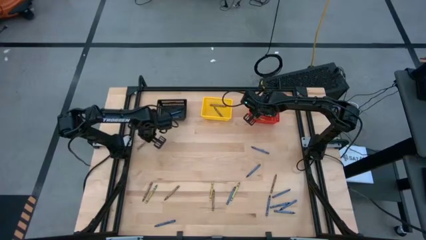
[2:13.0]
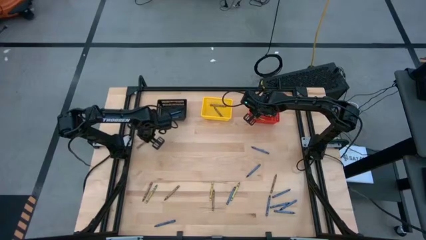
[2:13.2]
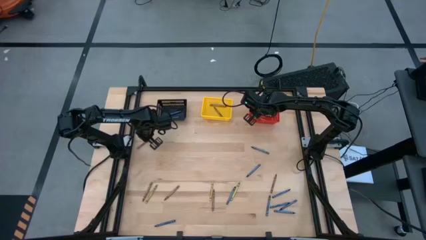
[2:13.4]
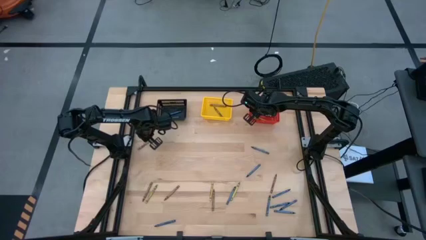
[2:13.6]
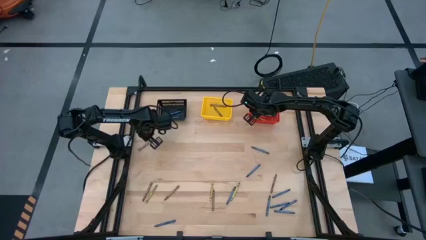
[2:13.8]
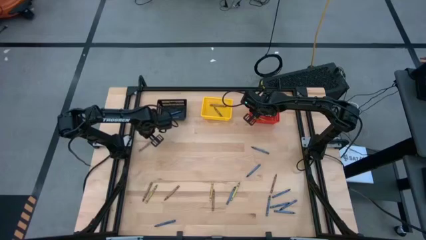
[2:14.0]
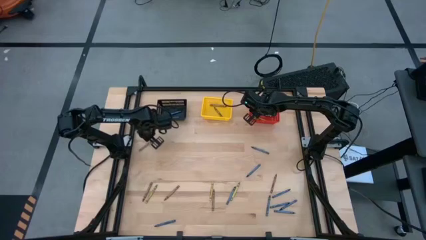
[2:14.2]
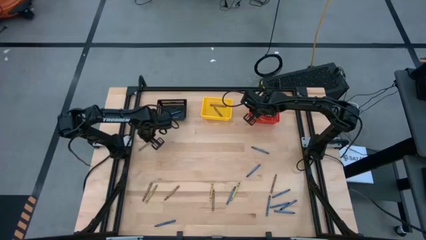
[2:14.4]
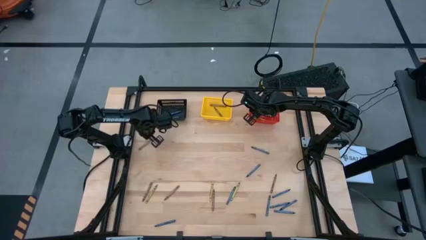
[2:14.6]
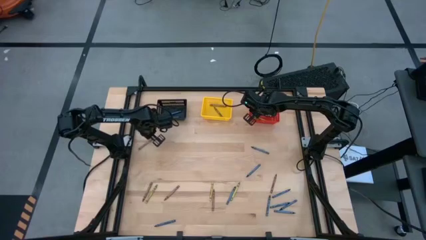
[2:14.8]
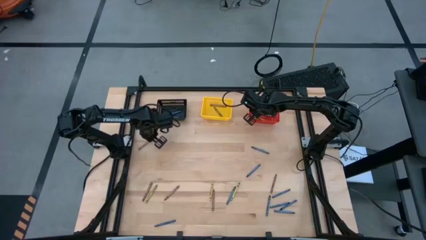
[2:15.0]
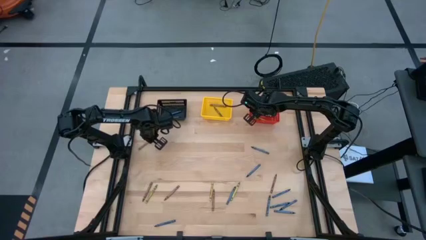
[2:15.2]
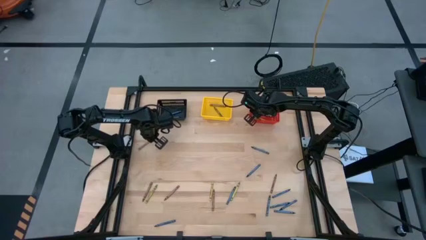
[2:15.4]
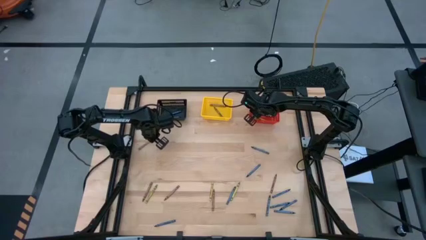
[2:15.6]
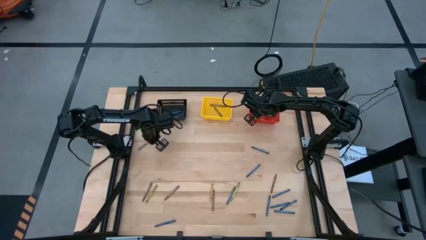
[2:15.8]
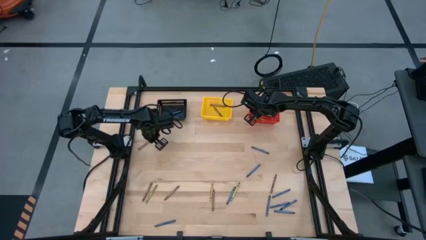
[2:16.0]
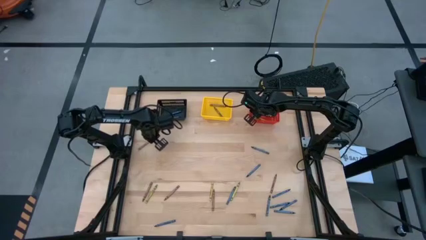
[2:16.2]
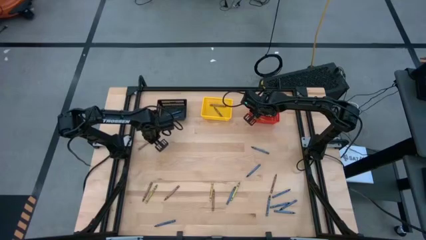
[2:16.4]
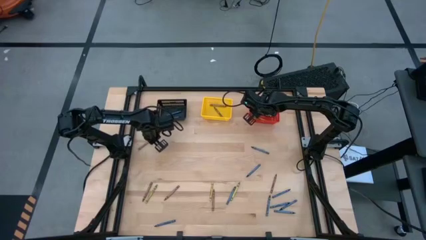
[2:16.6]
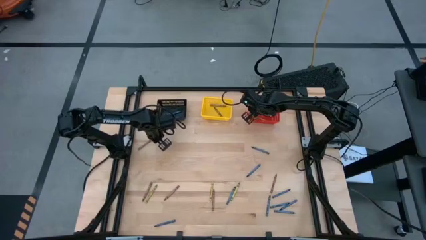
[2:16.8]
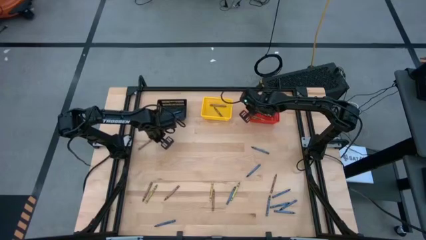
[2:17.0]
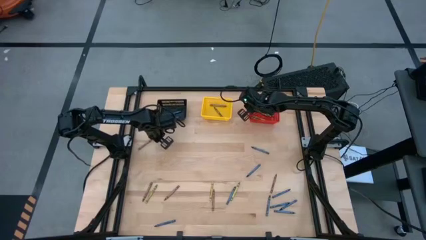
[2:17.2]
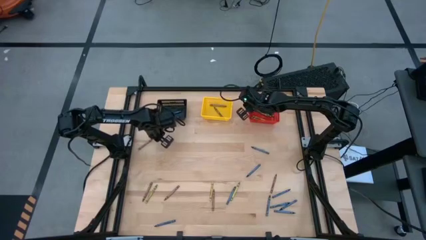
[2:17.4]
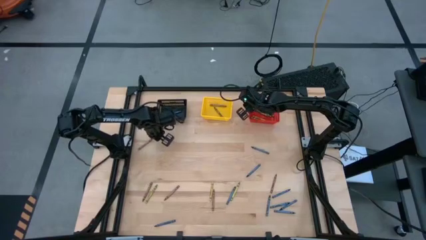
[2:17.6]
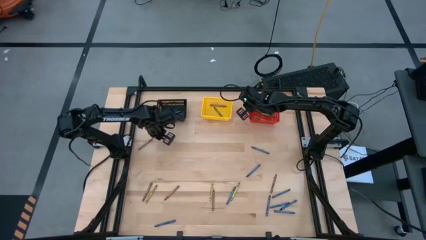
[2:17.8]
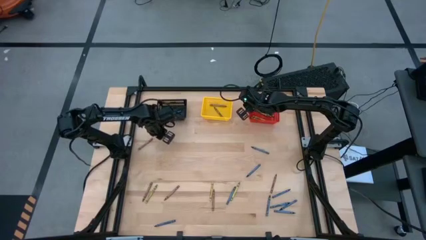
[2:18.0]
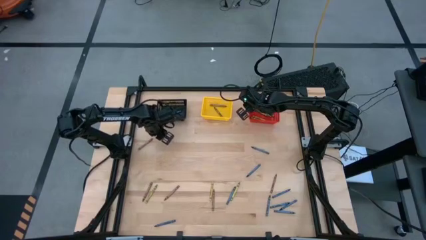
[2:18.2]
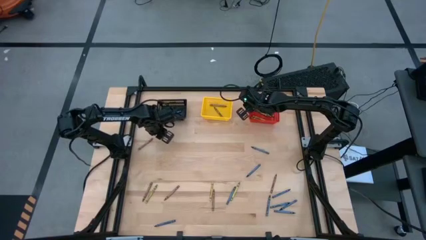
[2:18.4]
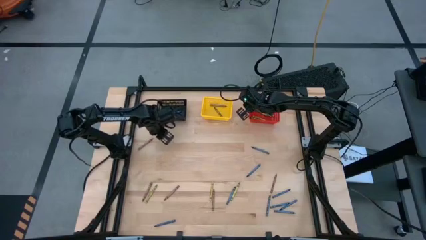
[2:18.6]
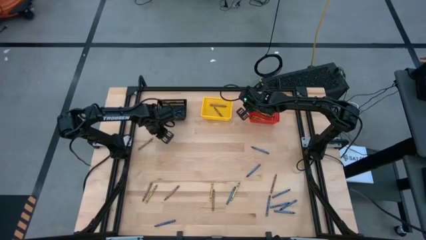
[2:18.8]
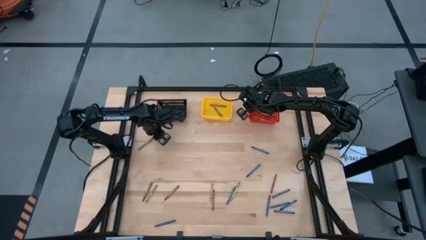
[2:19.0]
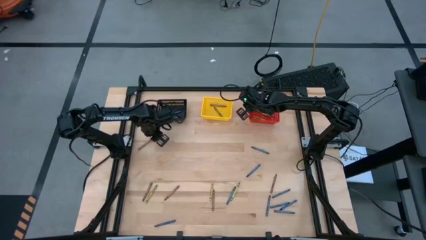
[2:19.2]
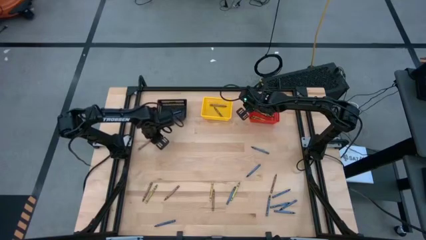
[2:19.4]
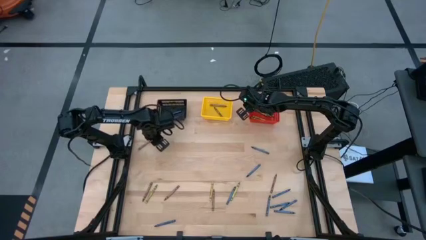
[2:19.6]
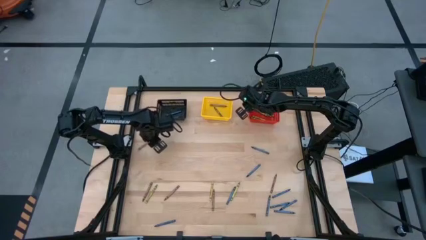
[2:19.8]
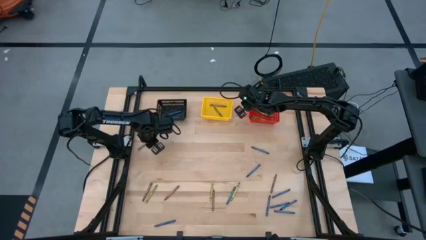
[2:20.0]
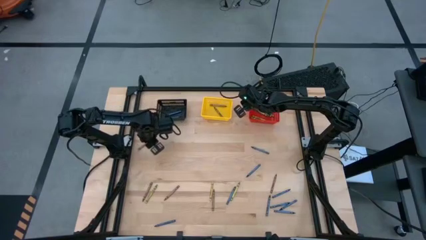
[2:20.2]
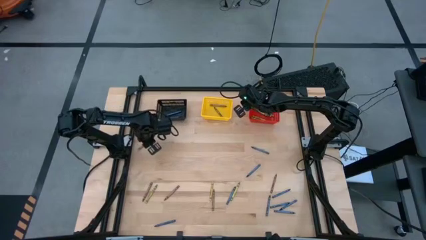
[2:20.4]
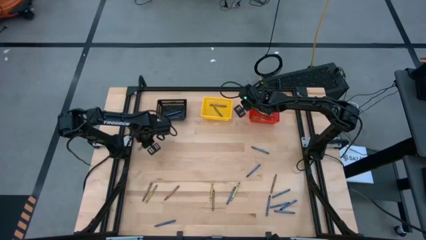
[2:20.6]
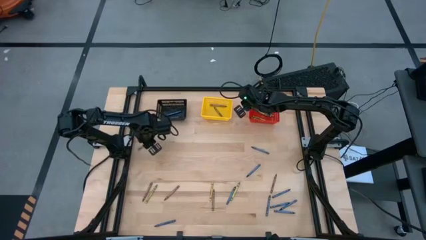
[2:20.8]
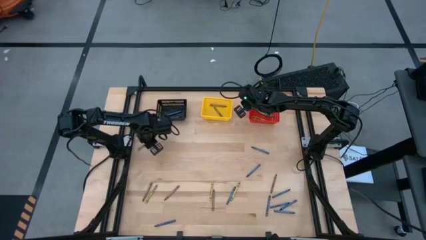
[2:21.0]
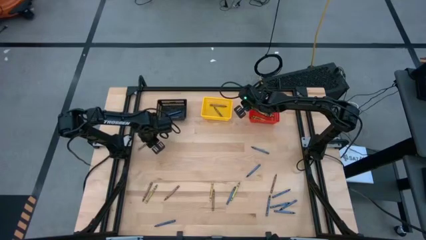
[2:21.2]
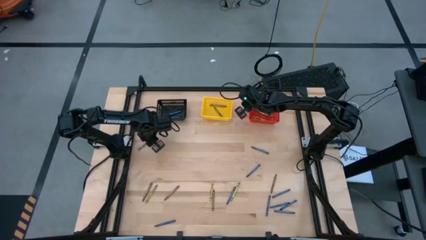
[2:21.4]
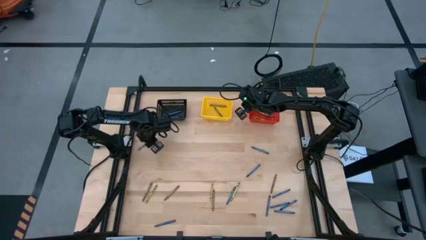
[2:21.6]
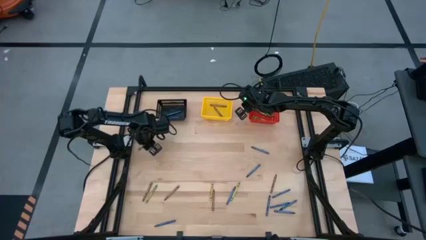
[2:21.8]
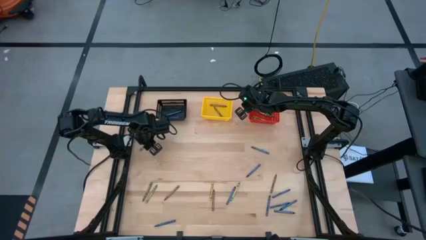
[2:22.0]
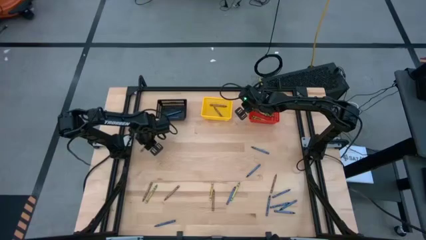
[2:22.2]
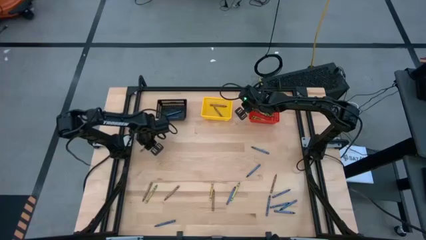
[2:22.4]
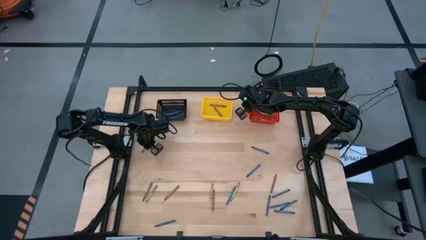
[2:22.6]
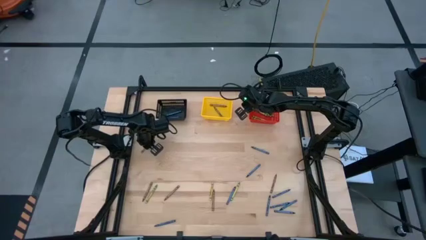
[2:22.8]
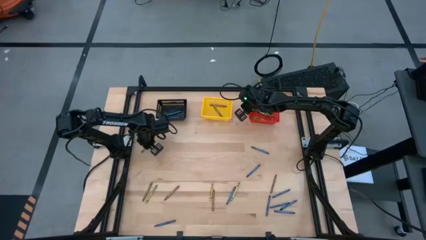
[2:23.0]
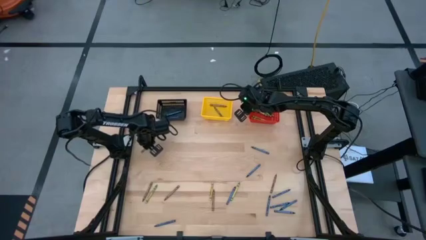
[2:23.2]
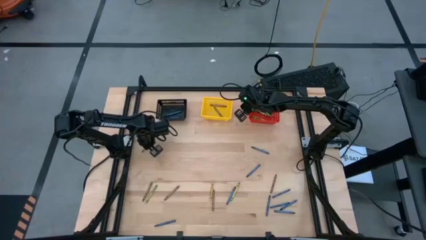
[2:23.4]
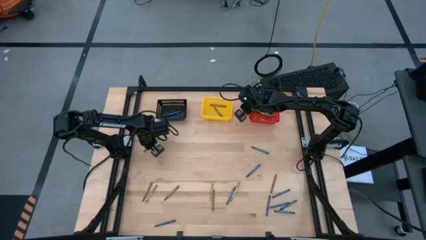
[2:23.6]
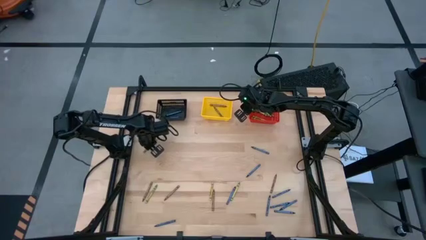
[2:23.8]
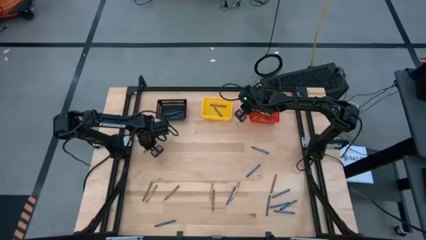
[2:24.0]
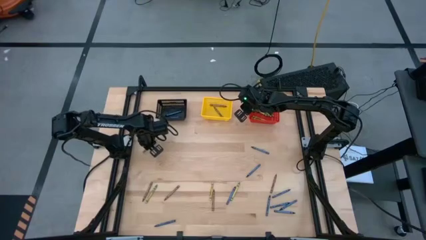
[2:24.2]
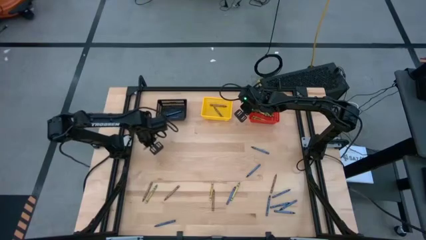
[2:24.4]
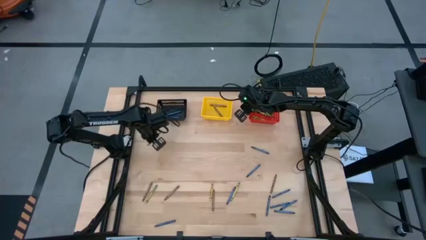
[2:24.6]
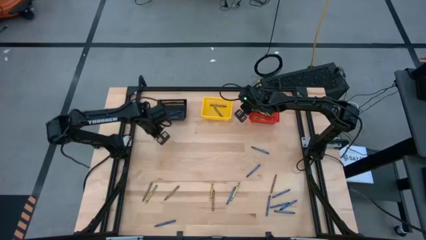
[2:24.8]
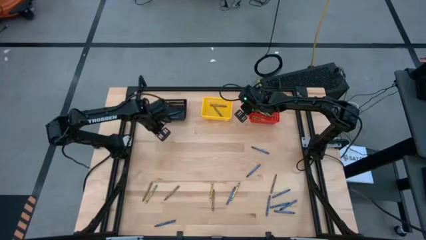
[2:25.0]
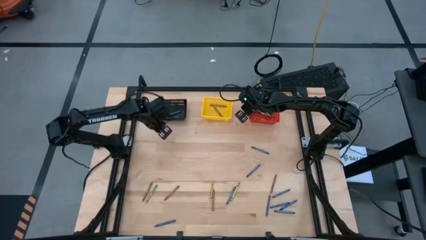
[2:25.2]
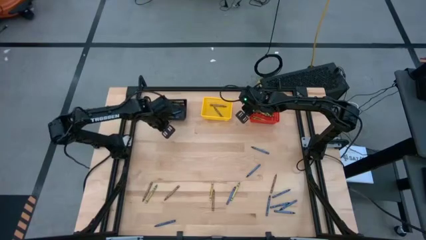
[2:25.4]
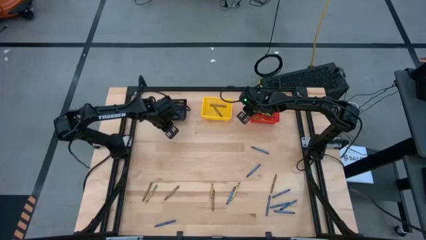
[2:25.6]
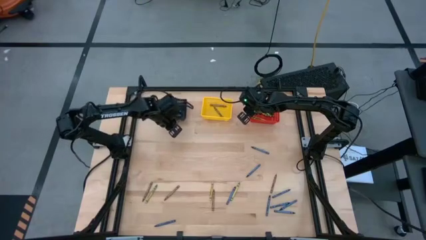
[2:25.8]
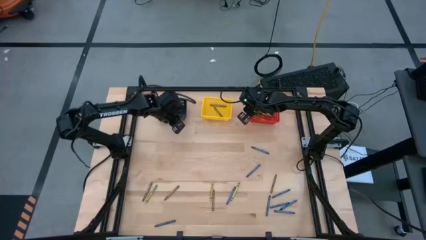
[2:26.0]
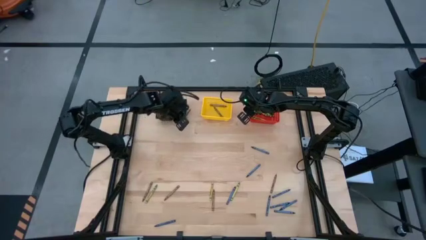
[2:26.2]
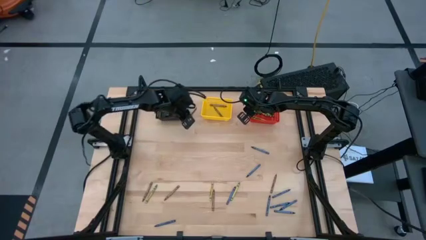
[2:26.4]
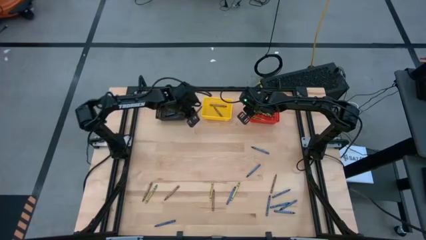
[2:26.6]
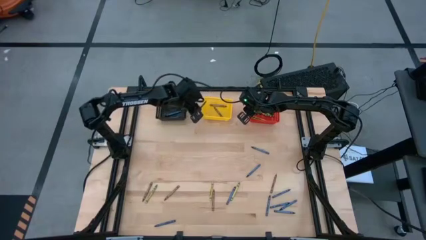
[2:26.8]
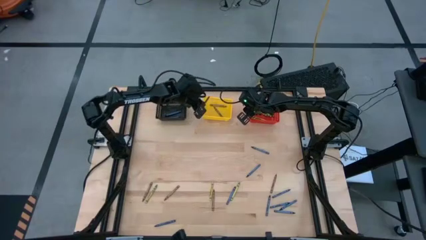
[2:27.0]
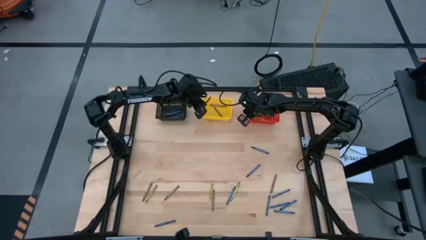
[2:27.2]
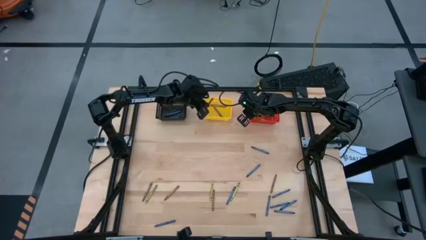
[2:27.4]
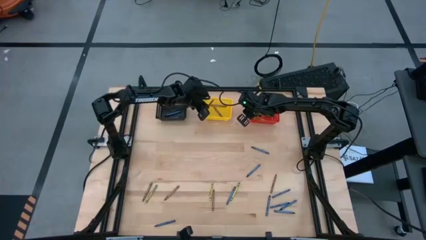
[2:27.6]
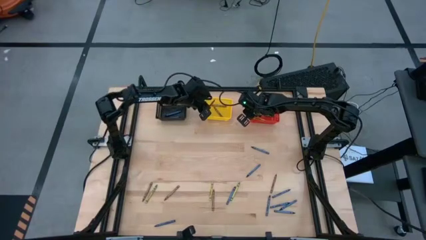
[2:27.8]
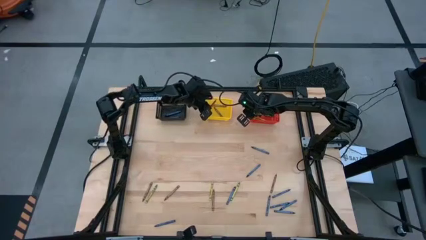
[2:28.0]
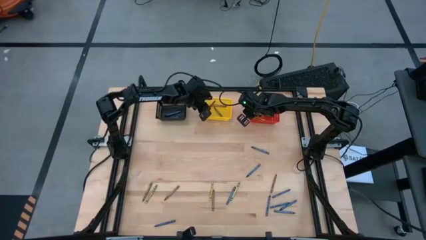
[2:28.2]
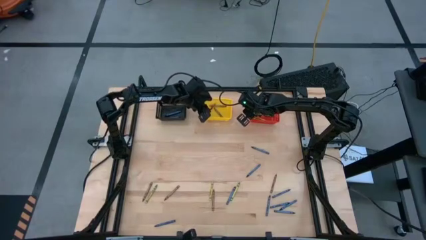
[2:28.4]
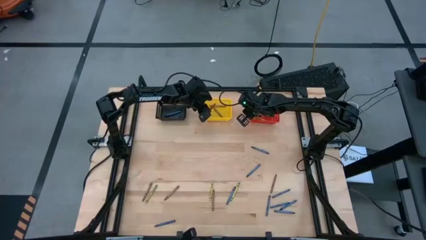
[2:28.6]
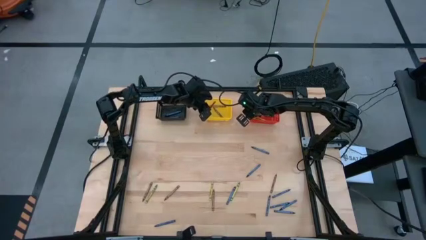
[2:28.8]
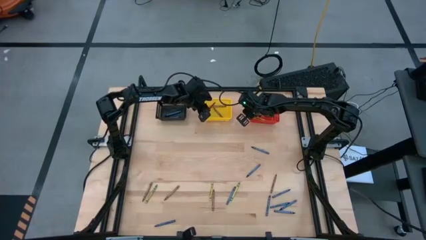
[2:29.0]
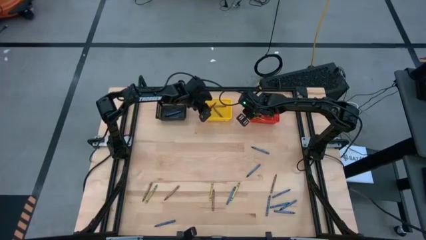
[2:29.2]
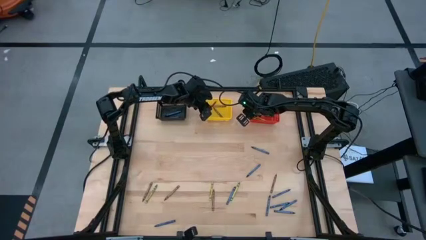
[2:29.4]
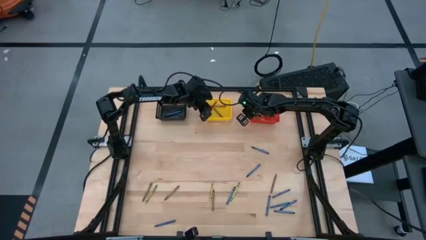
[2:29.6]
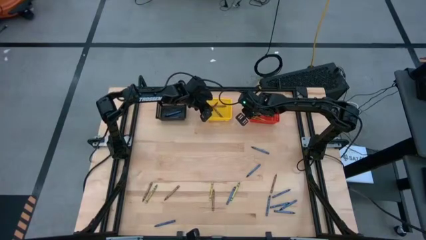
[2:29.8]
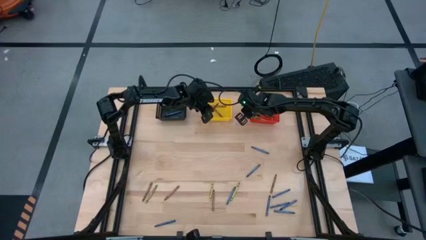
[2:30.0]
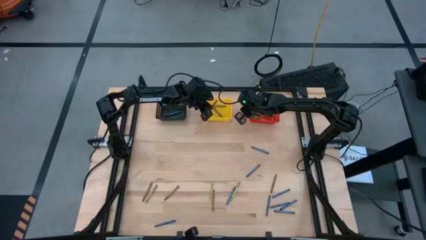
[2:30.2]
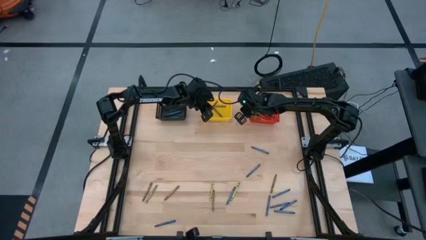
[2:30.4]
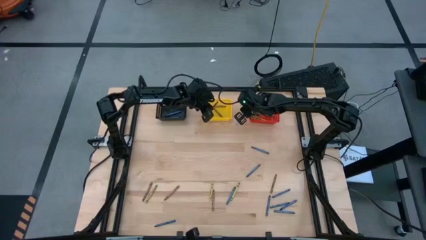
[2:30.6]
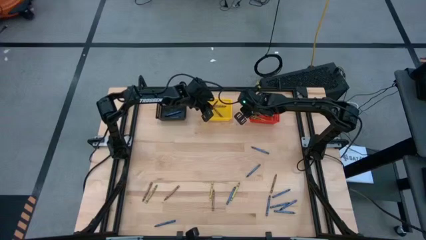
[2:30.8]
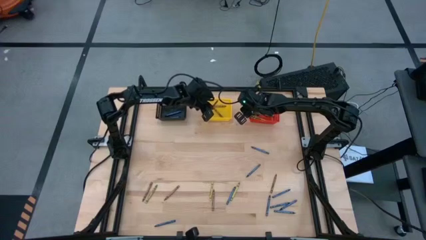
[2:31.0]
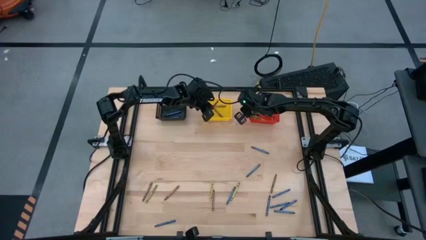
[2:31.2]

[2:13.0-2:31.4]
Task: Sort crayons
Put the brown crayon into the yellow bin
